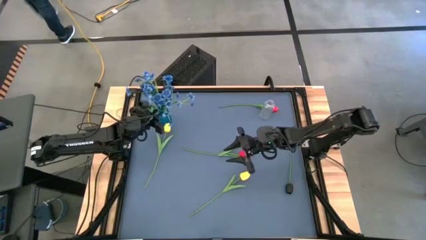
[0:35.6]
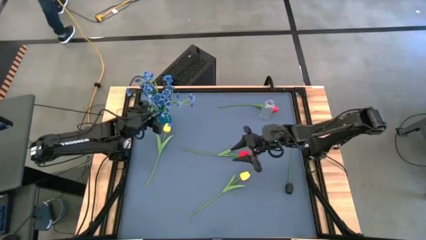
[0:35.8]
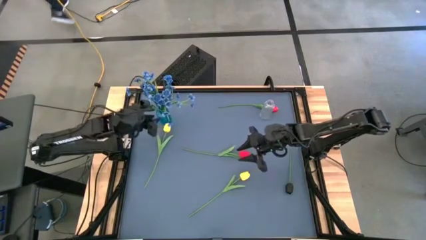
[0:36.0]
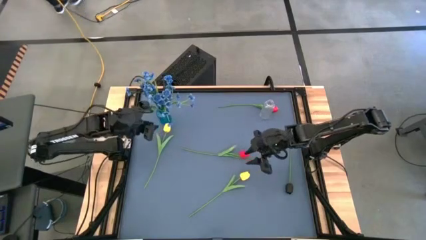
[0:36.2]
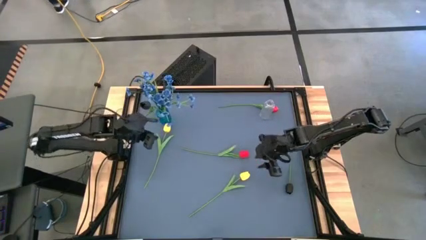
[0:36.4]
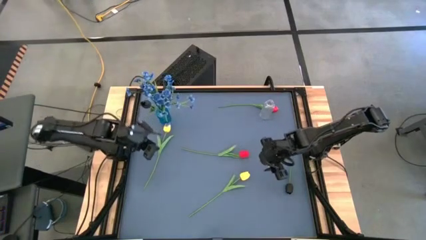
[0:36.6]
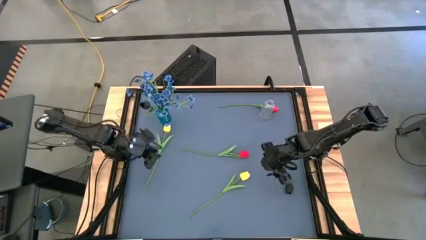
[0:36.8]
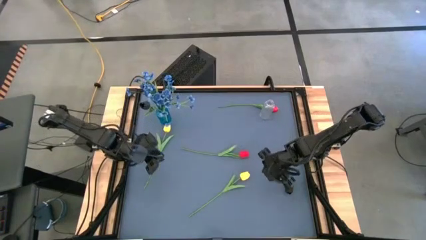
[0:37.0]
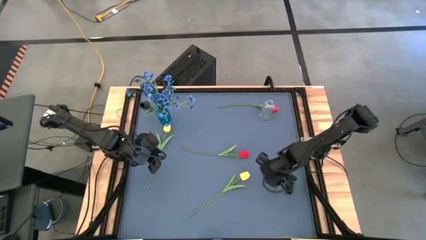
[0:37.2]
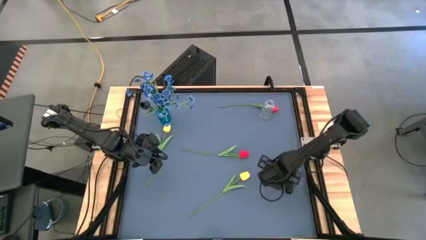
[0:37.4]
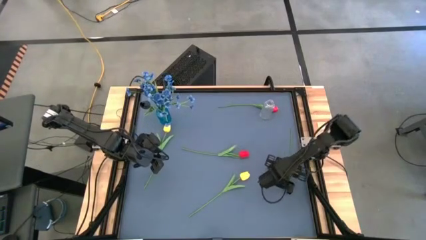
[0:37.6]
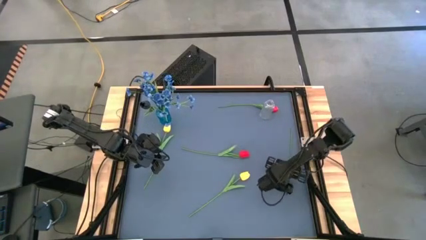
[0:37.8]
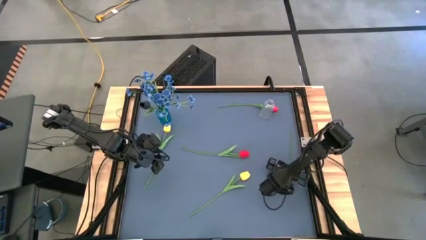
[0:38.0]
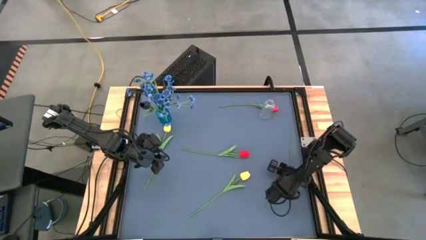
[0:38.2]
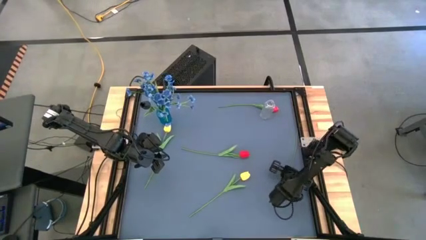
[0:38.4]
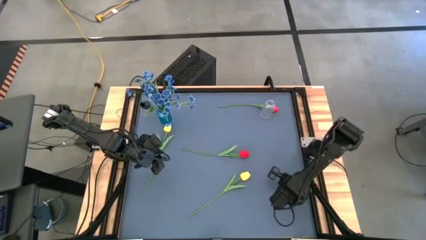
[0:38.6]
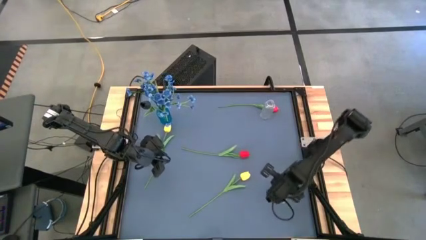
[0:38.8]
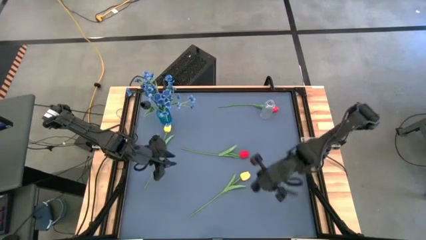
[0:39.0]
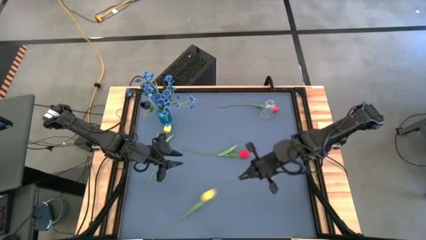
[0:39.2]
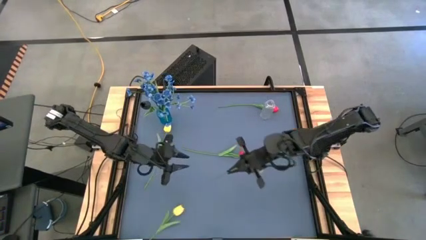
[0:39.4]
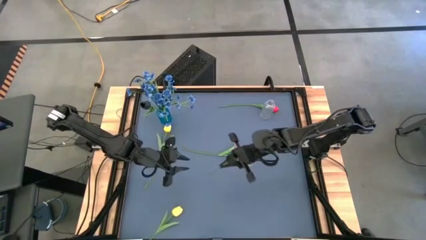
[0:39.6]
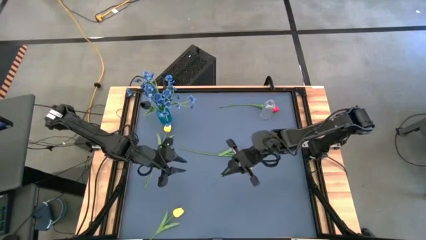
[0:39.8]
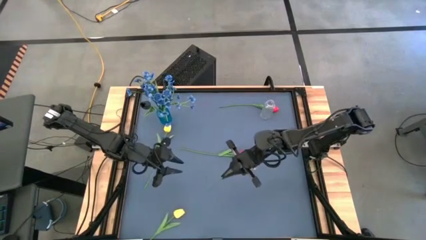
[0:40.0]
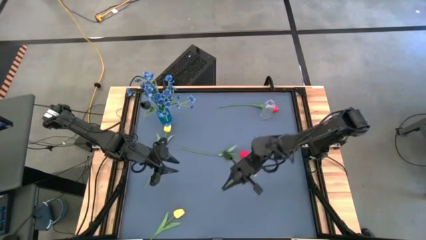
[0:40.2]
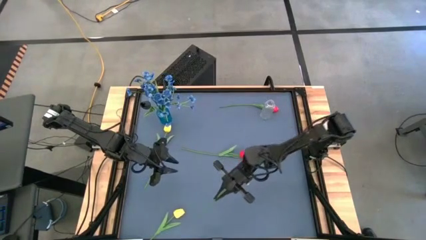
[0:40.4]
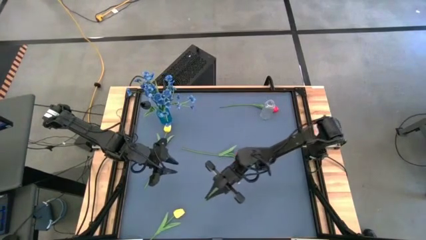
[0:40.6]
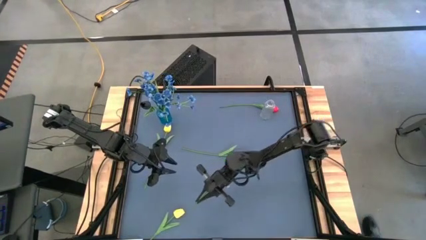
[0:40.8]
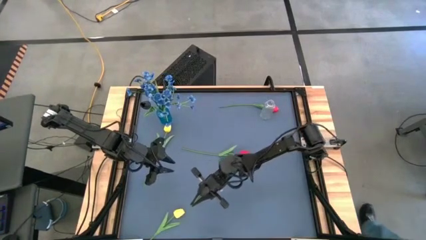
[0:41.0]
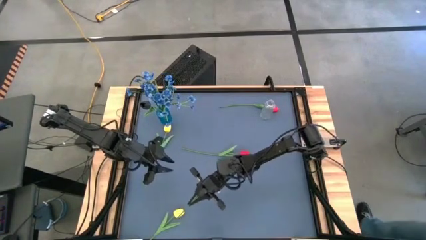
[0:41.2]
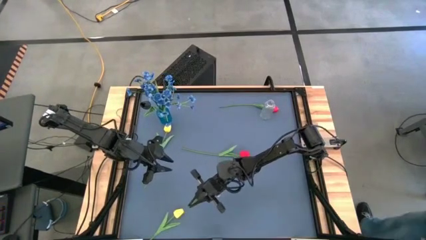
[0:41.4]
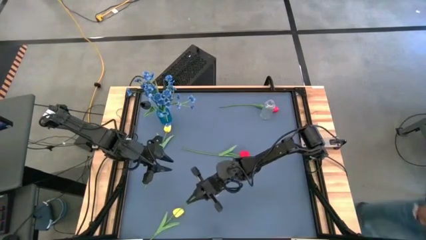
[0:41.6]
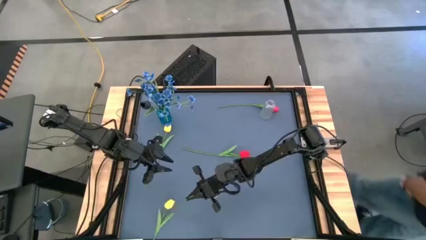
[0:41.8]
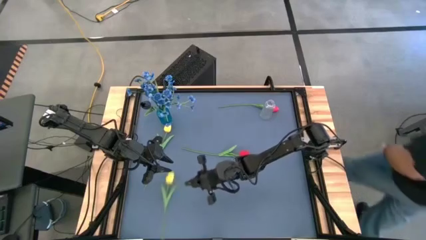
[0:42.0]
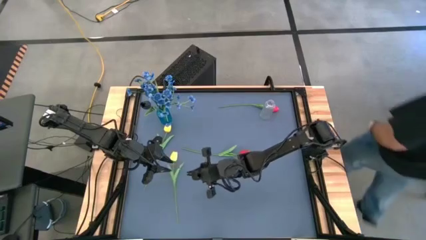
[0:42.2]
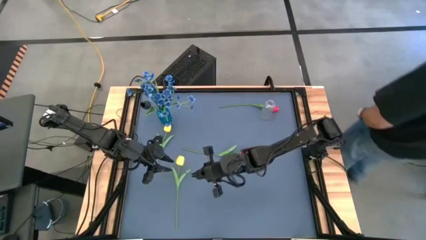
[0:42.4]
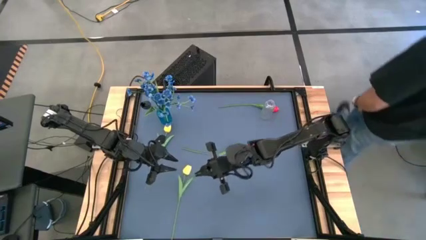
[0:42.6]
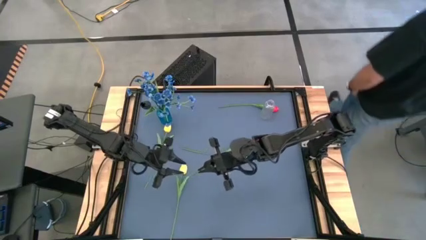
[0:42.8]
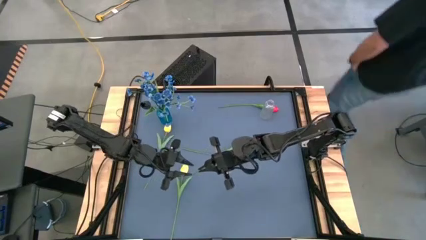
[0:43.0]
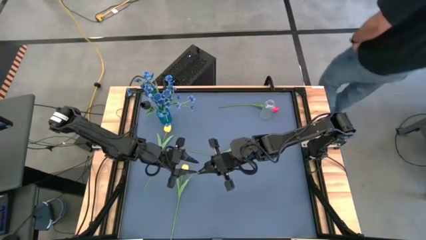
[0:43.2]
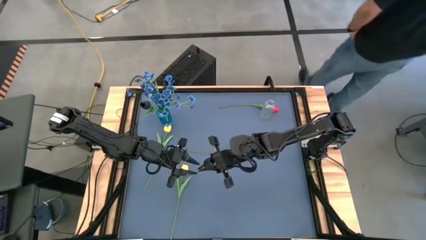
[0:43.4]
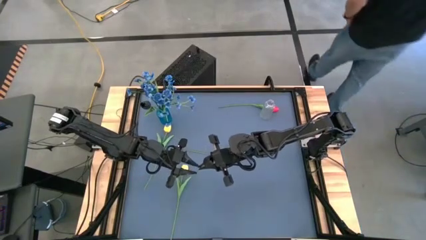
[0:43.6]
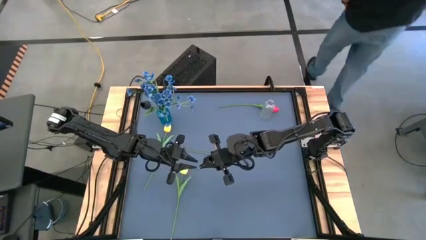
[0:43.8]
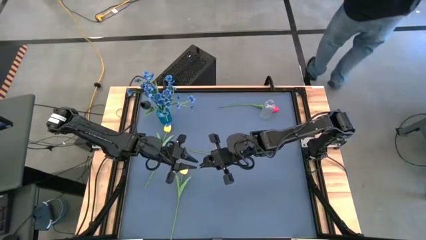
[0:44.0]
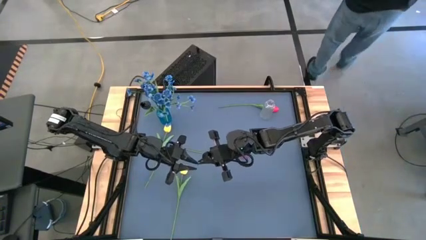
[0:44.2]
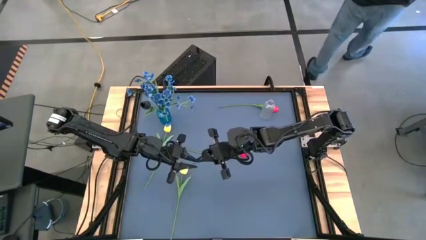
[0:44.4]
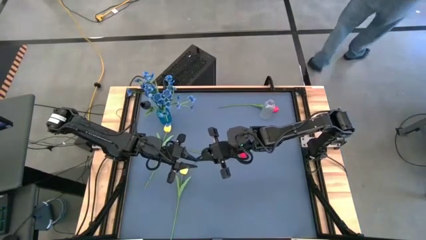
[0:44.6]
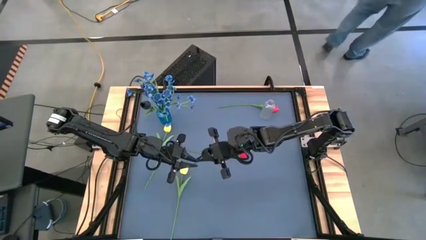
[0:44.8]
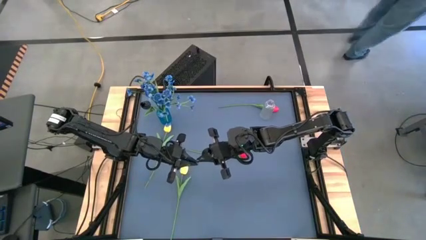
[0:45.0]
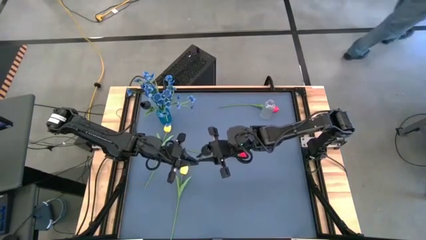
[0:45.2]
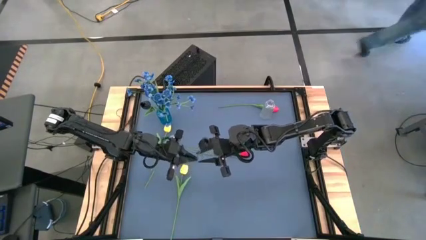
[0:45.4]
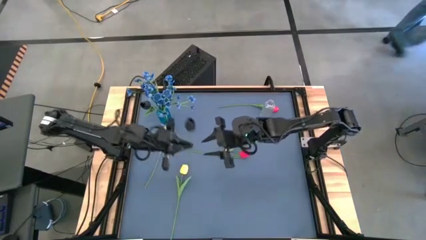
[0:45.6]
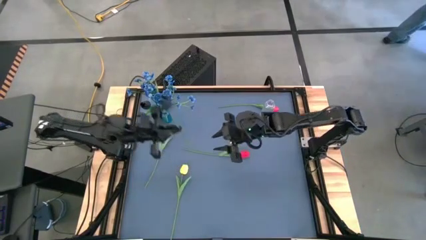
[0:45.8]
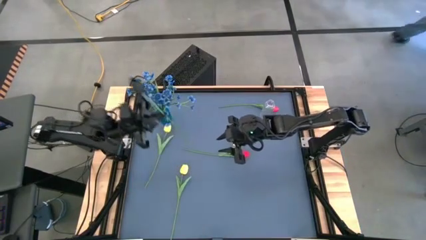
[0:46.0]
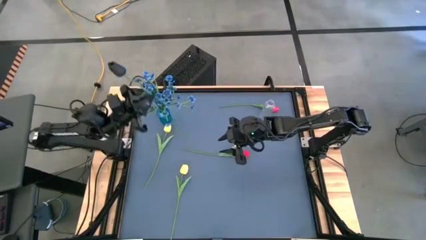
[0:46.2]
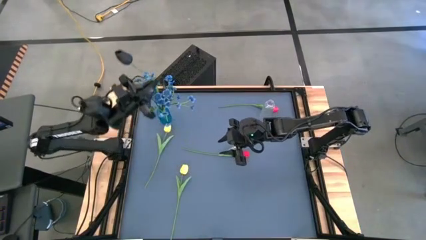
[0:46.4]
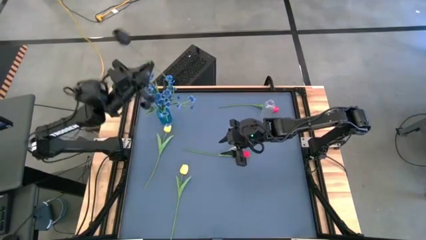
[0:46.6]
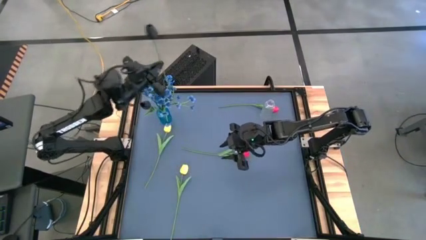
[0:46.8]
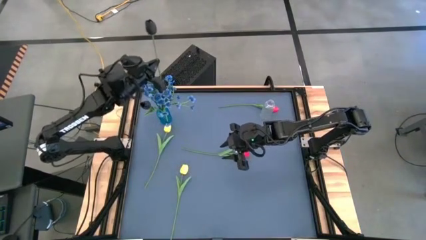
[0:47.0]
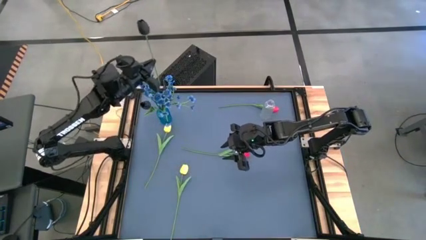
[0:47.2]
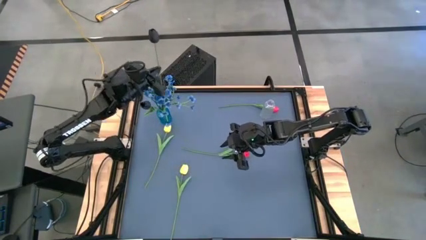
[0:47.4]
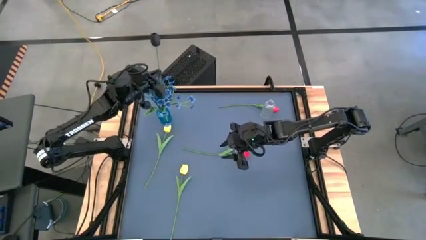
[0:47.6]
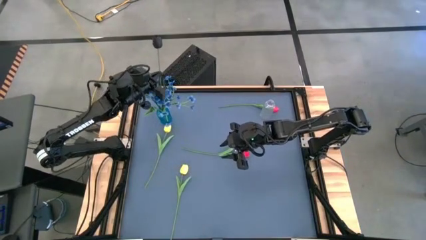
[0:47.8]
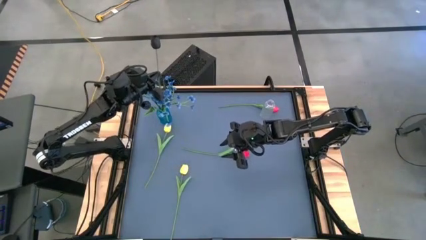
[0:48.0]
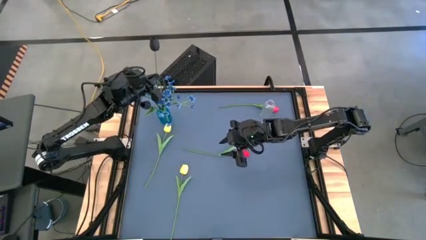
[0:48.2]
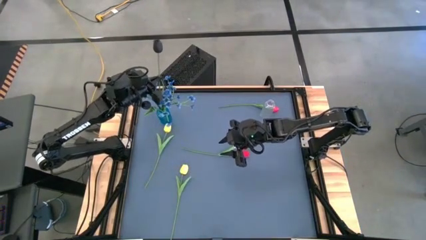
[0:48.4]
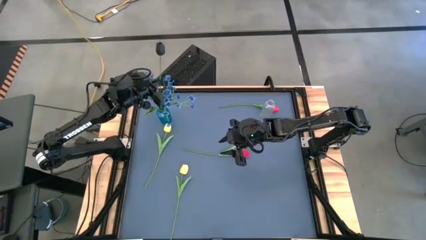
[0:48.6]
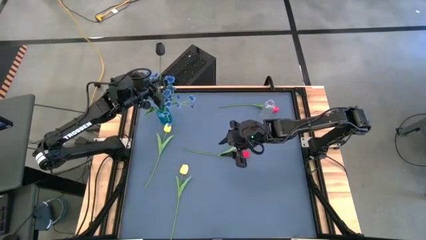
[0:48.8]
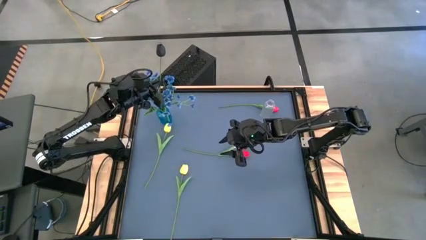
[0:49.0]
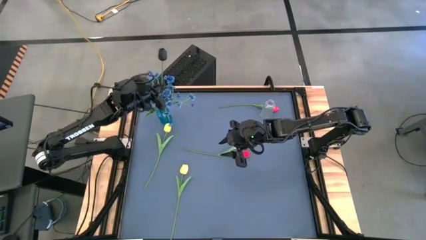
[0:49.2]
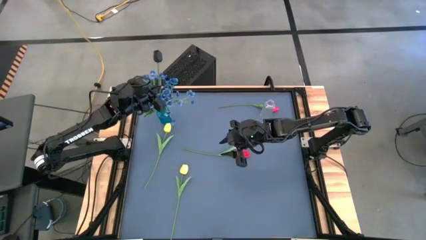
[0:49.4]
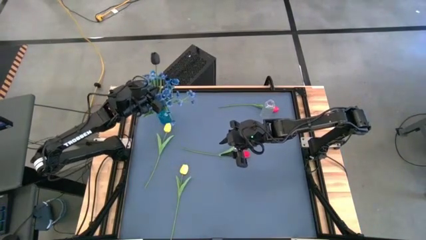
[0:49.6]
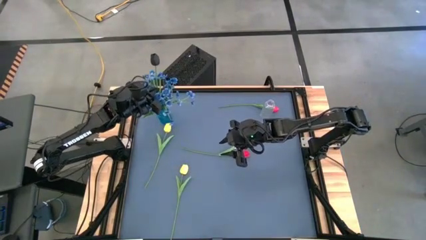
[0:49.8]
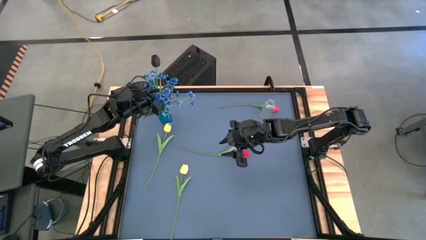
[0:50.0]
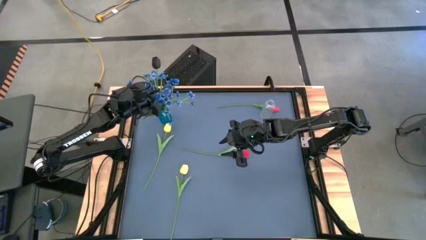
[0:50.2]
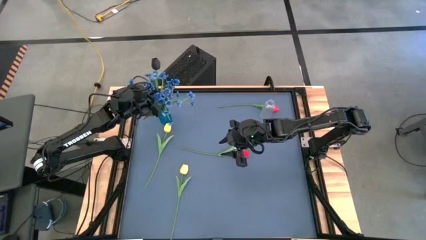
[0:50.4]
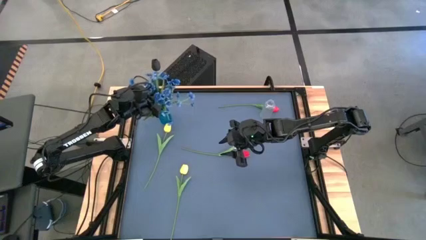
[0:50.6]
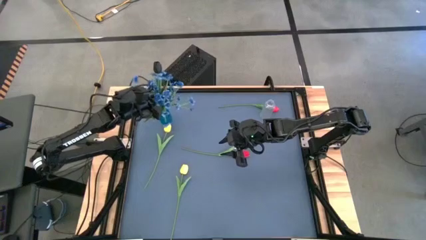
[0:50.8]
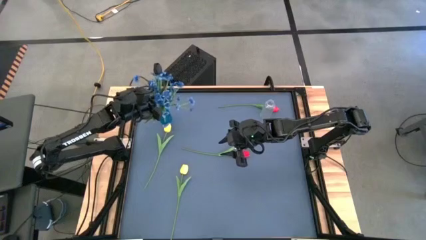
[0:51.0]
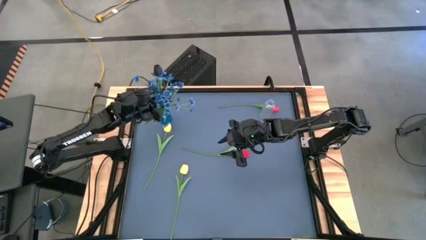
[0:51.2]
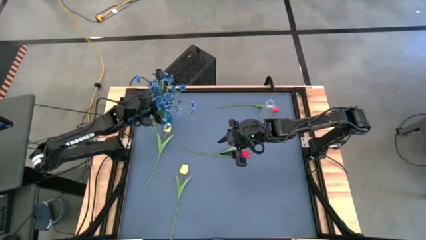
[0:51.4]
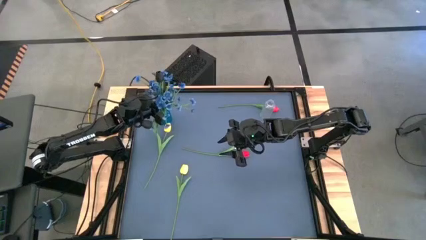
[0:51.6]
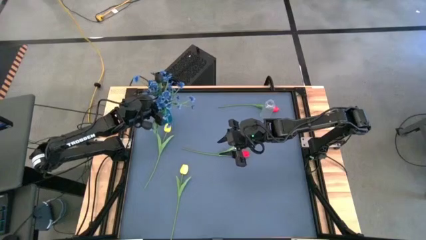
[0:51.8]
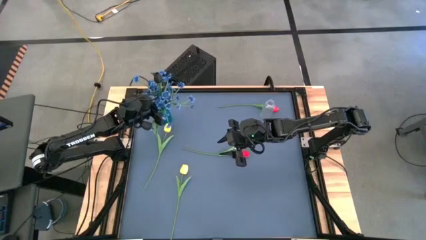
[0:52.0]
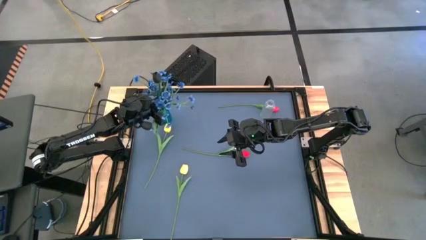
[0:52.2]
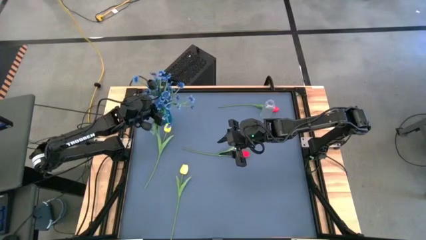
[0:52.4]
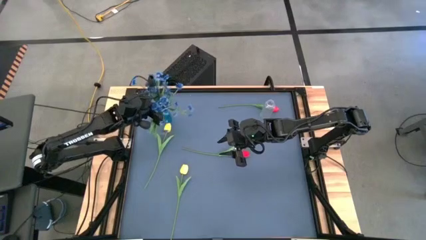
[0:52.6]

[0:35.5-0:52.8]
Task: Sort flowers into vase by color
Put the black tulip into the blue vase
